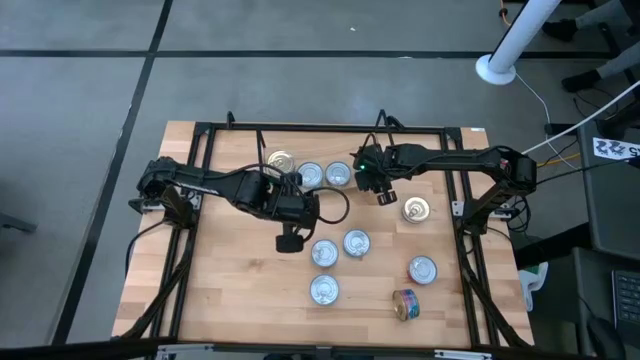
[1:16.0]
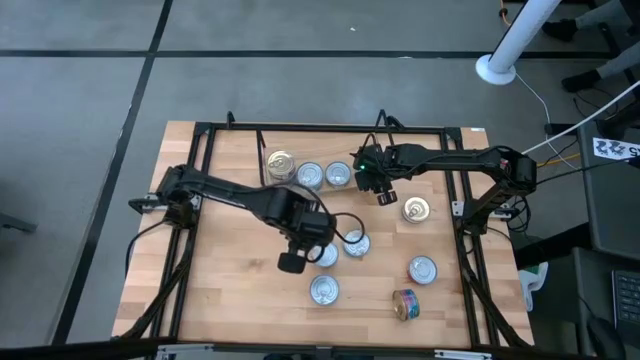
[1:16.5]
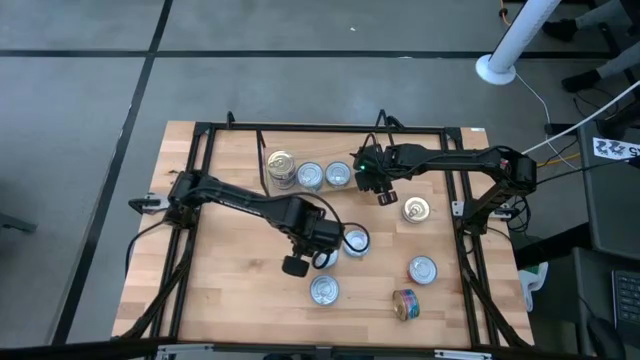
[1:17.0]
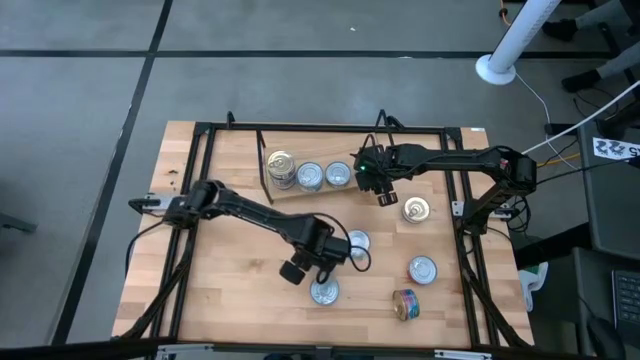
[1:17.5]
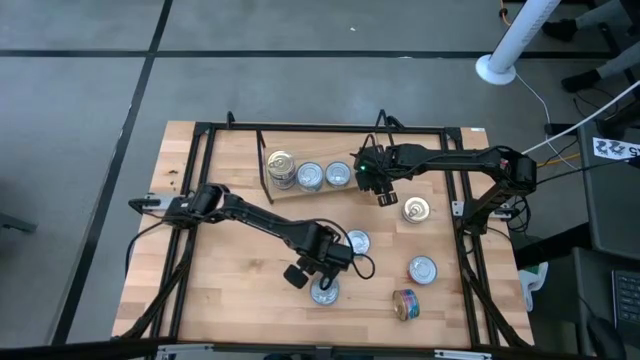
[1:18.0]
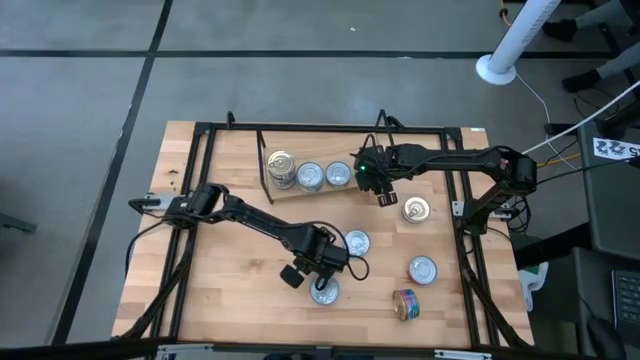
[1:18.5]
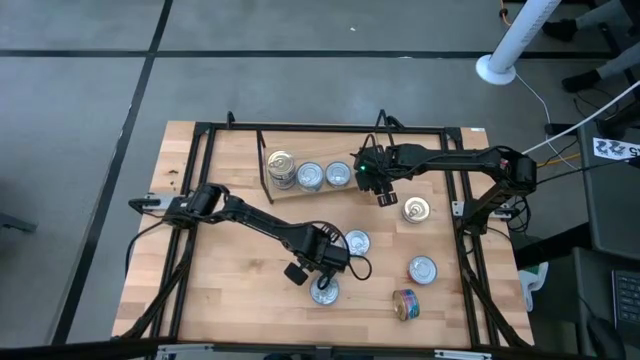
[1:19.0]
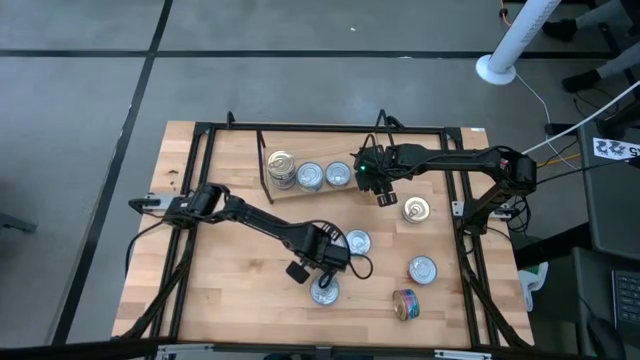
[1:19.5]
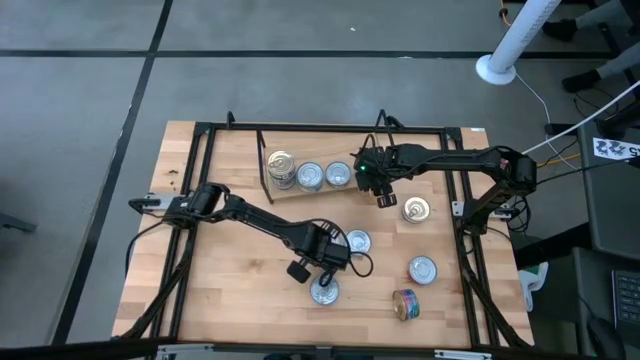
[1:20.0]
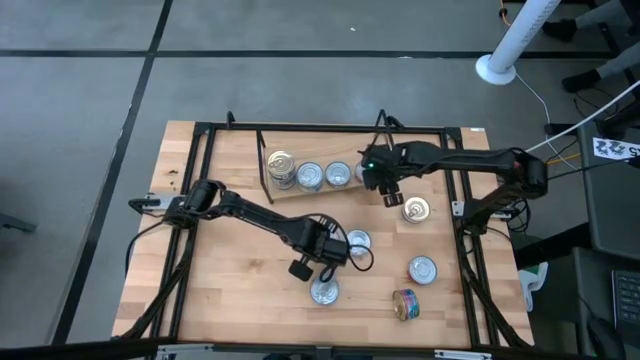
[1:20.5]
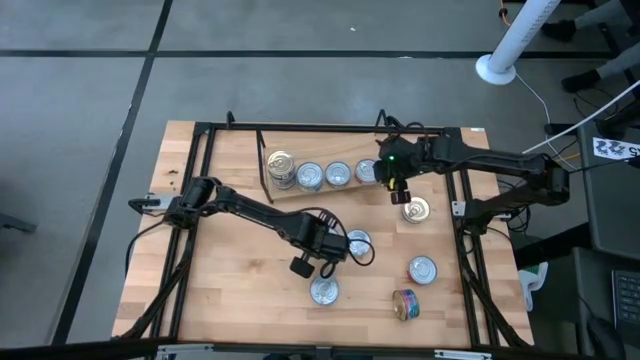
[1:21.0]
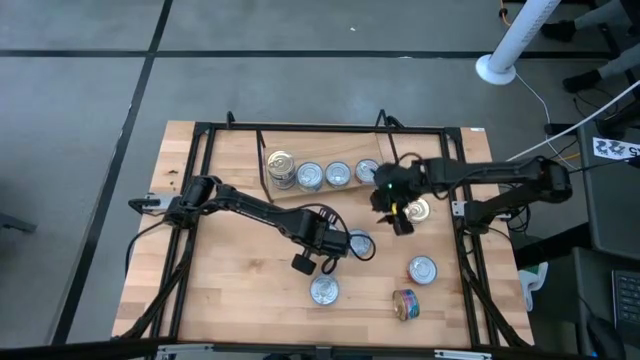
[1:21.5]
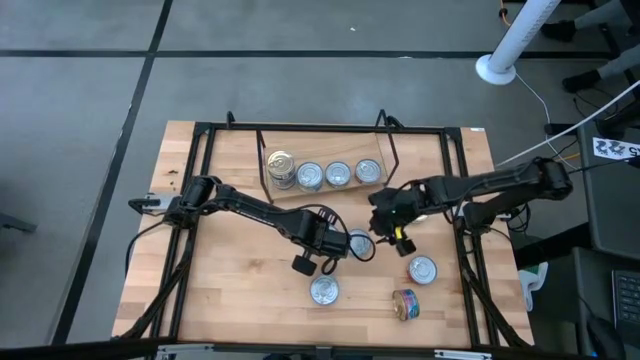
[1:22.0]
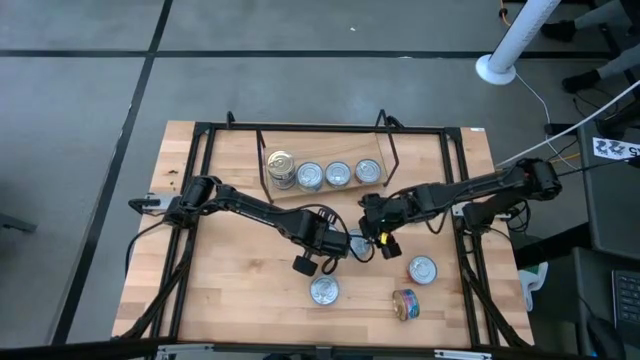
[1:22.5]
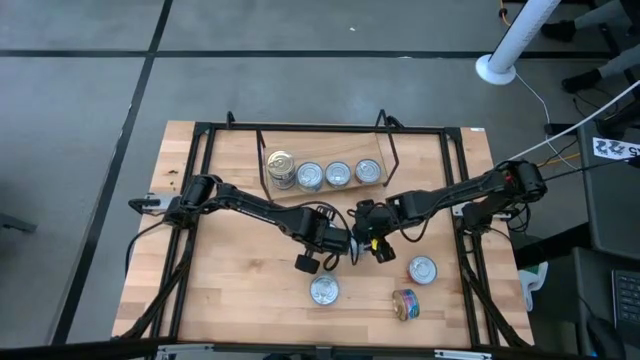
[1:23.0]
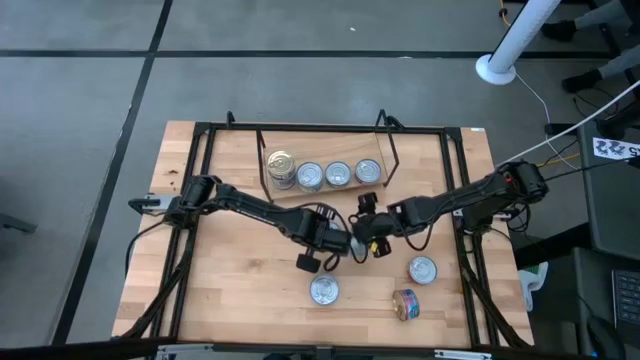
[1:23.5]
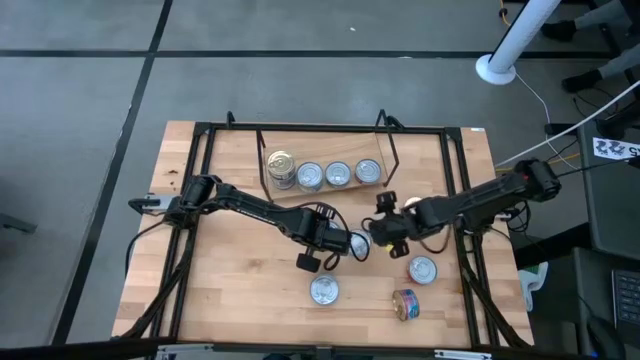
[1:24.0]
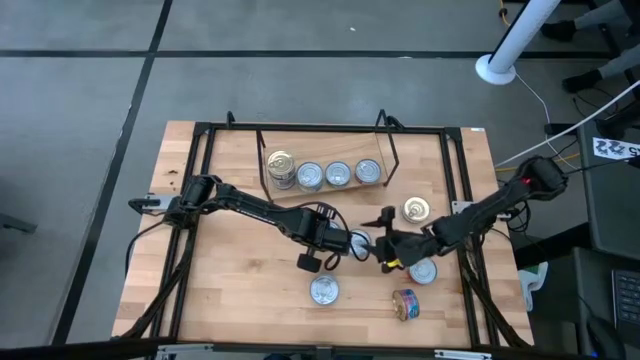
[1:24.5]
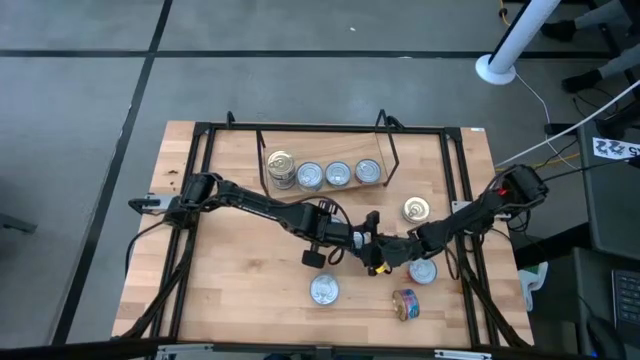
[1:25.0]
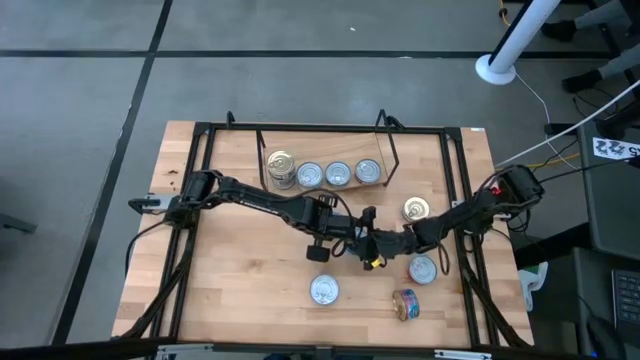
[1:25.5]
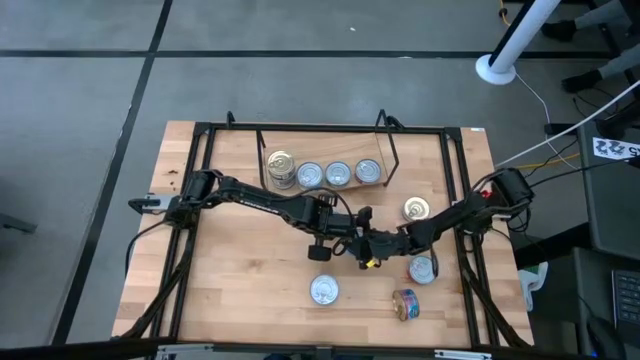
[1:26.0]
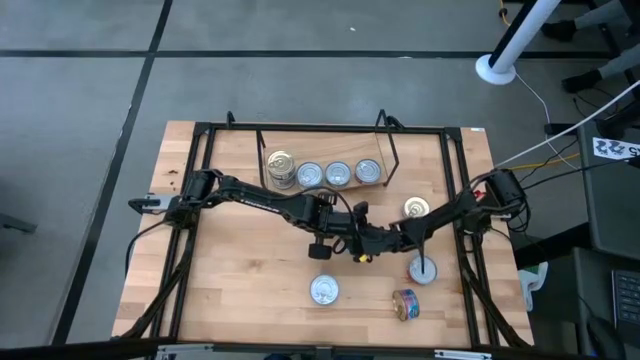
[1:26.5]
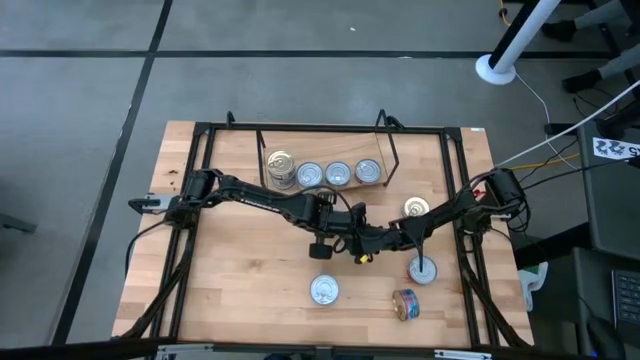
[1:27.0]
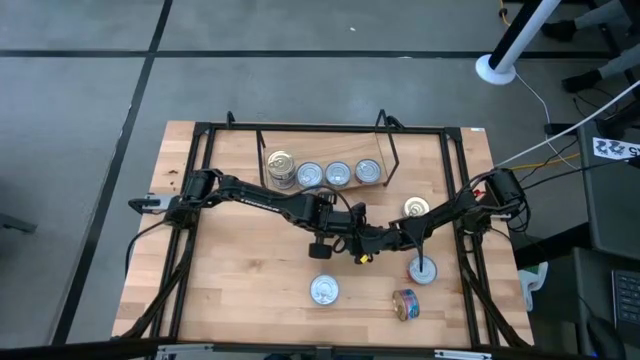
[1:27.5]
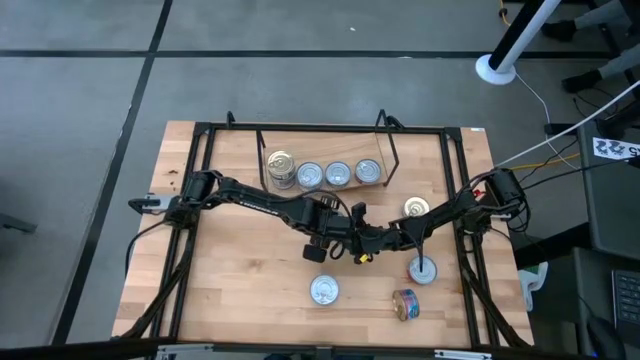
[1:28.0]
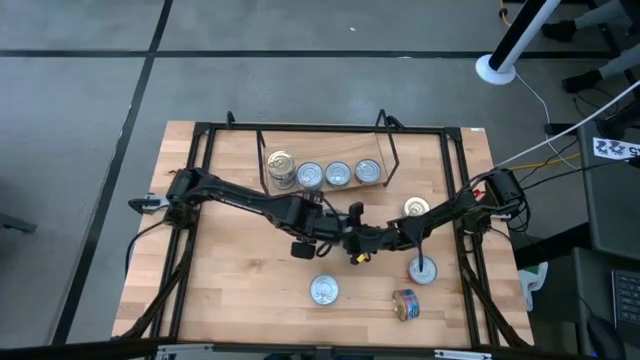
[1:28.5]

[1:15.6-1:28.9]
Task: Stack canned seafood by type on shelf
Stack the yellow blue tuna can on top of the other yellow blue tuna cans on the shelf

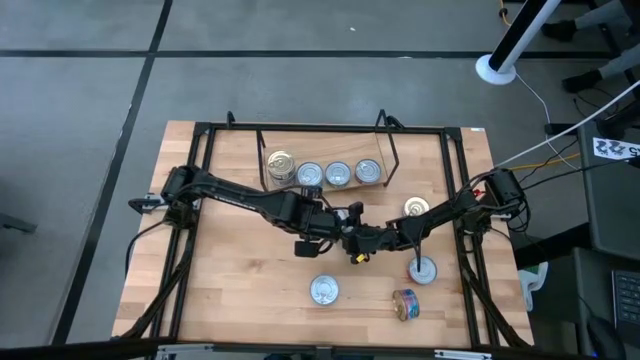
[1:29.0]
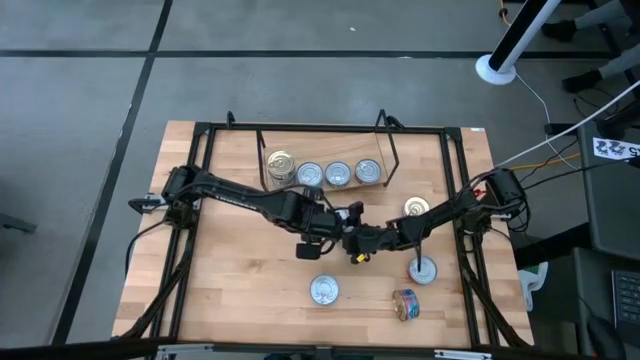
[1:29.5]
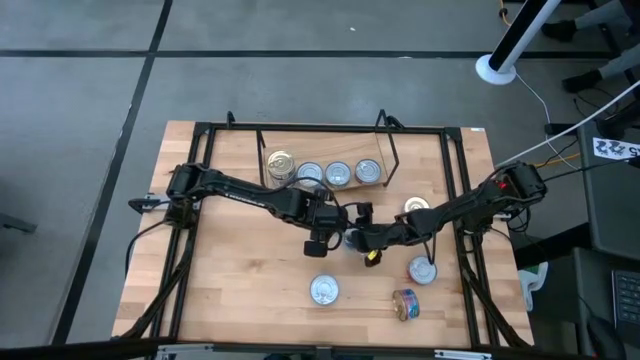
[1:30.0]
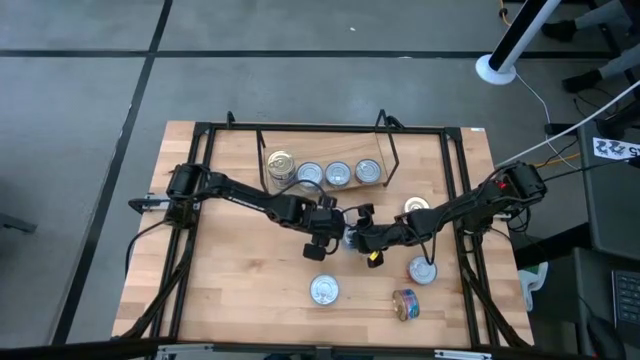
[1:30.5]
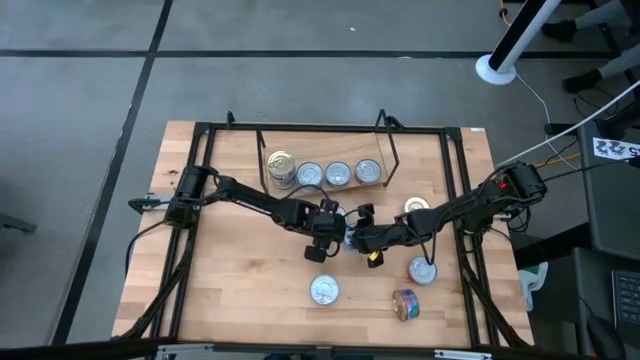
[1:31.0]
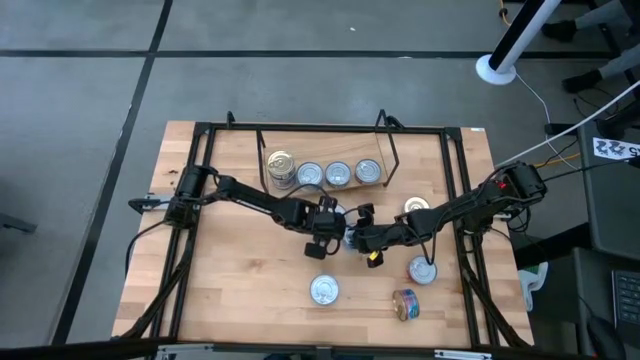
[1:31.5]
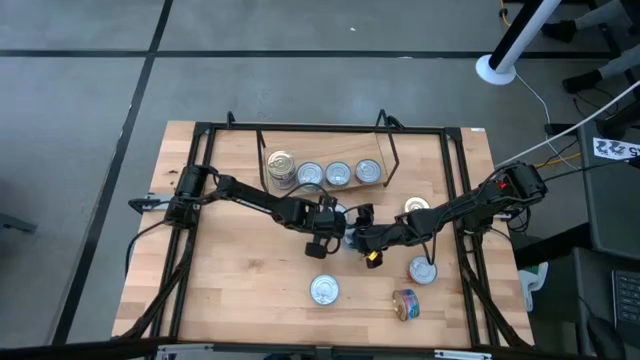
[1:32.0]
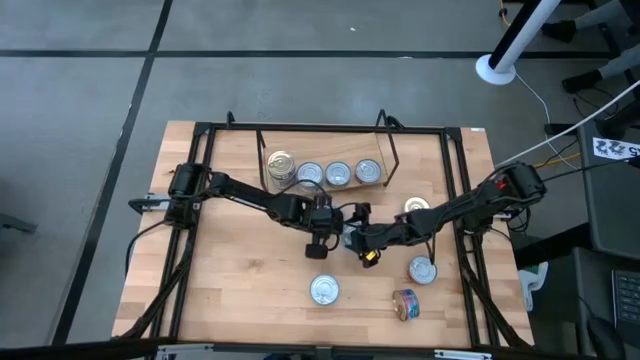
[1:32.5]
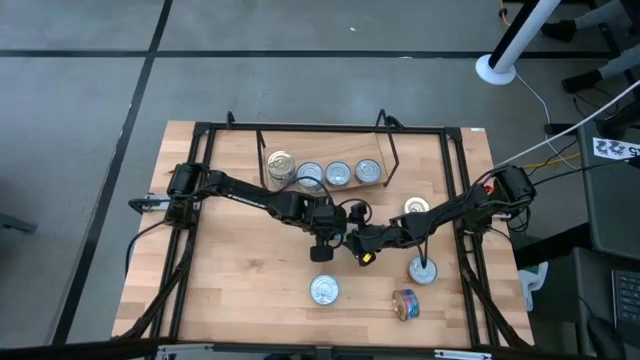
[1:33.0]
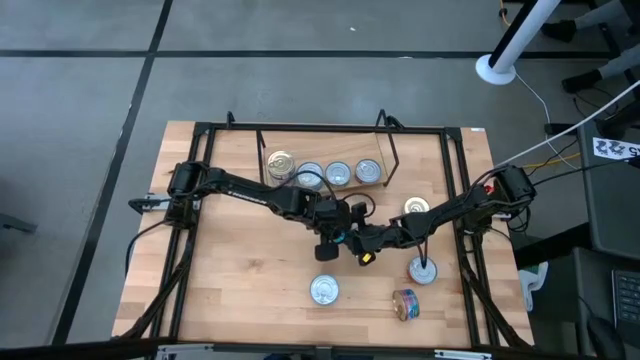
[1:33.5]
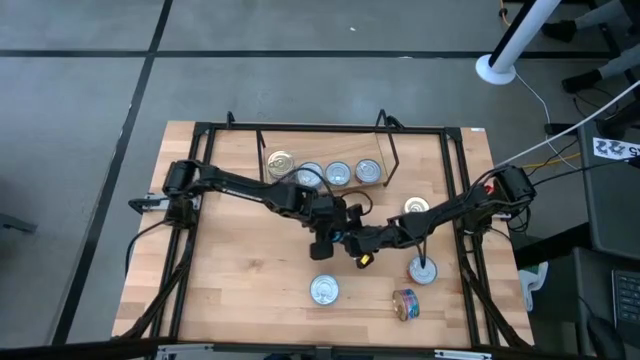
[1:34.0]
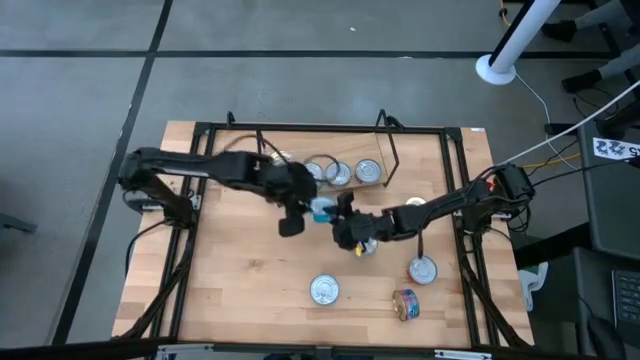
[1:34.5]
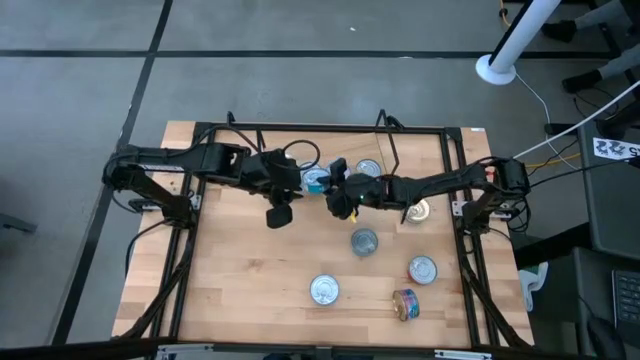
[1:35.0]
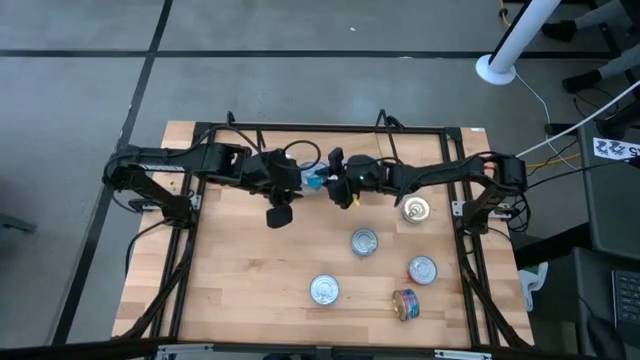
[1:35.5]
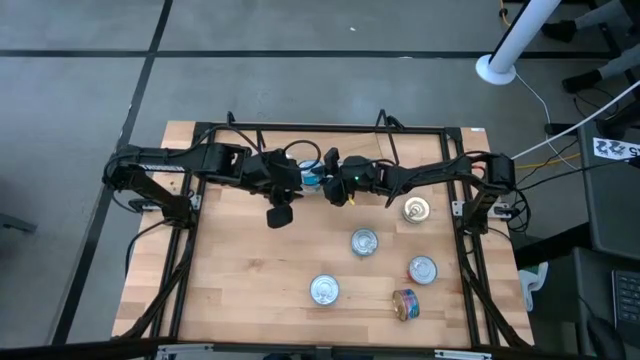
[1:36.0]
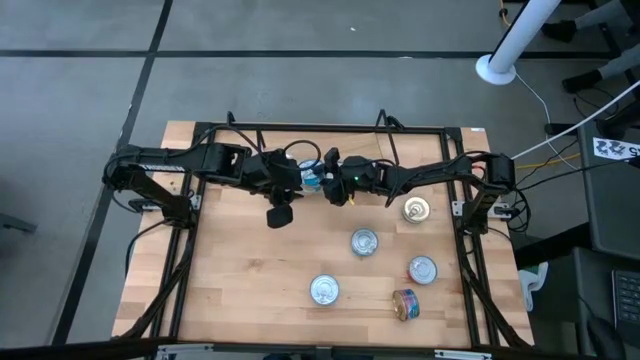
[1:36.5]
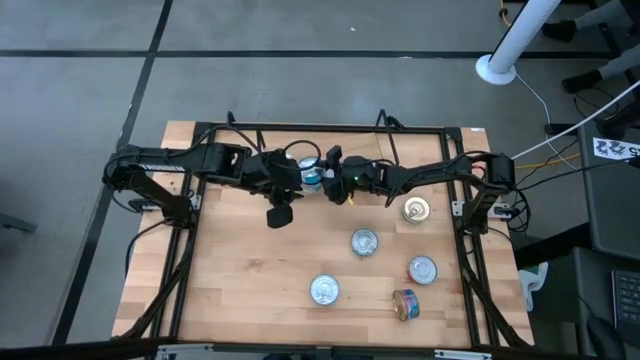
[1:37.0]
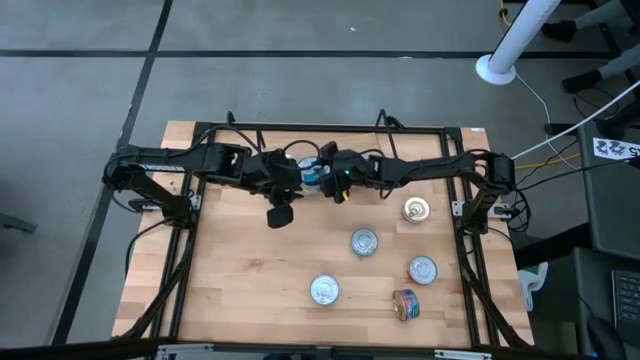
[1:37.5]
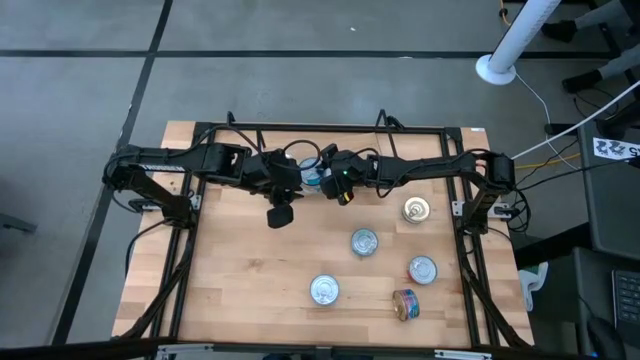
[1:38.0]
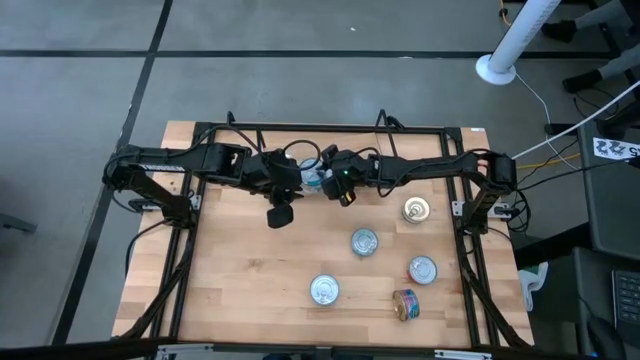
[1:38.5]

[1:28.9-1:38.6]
Stack the yellow blue tuna can on top of the other yellow blue tuna cans on the shelf
